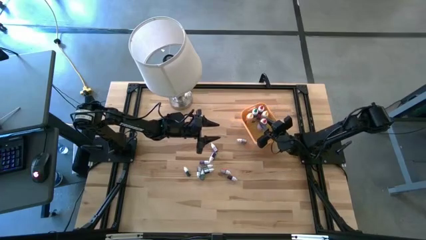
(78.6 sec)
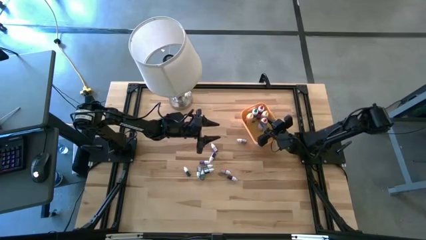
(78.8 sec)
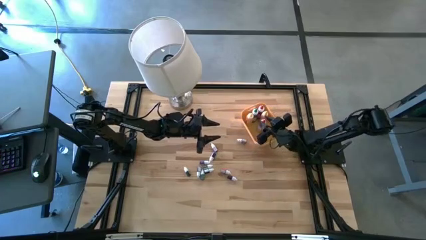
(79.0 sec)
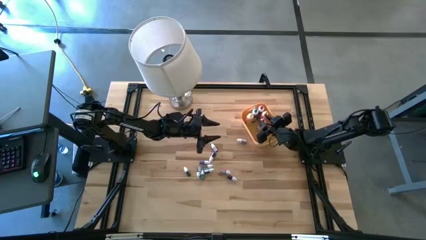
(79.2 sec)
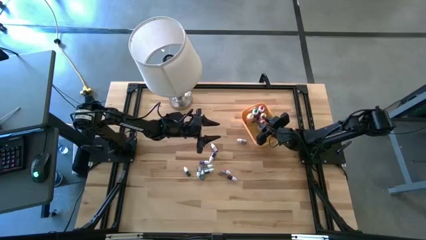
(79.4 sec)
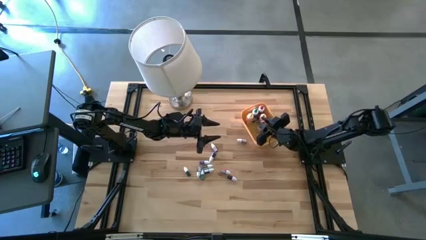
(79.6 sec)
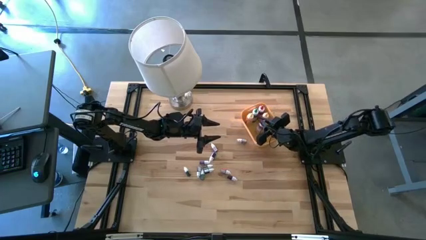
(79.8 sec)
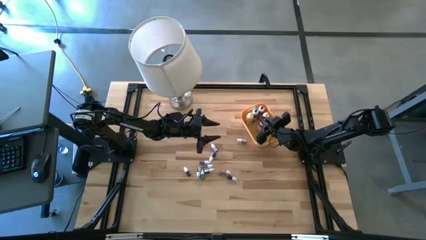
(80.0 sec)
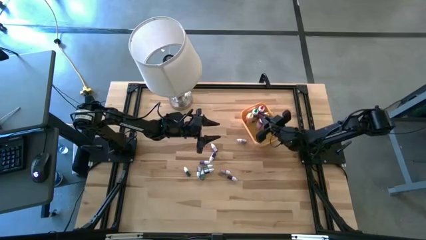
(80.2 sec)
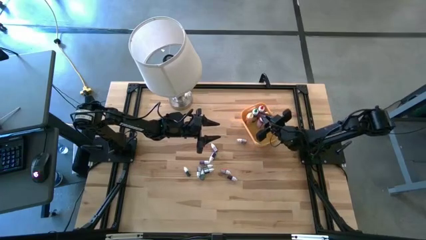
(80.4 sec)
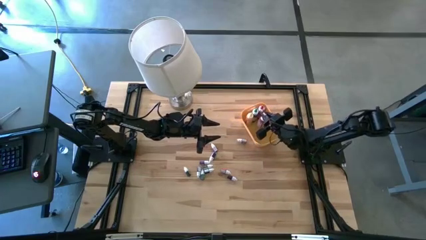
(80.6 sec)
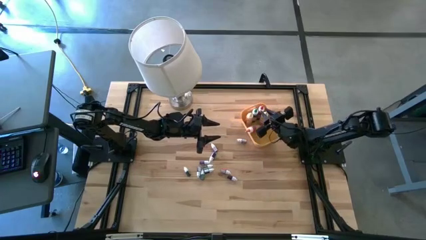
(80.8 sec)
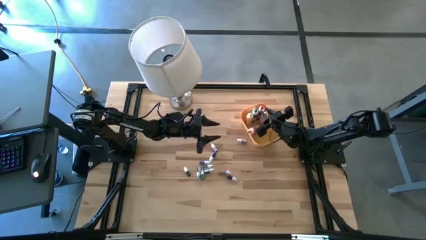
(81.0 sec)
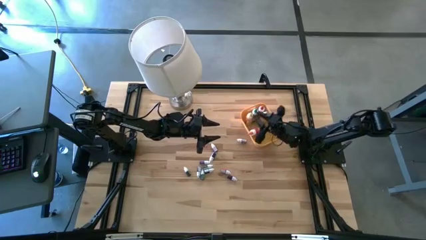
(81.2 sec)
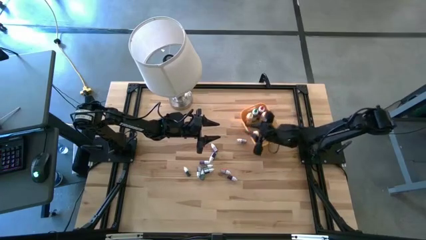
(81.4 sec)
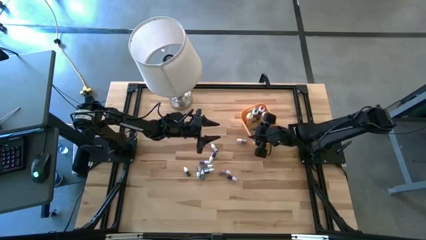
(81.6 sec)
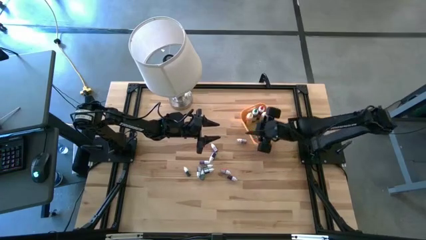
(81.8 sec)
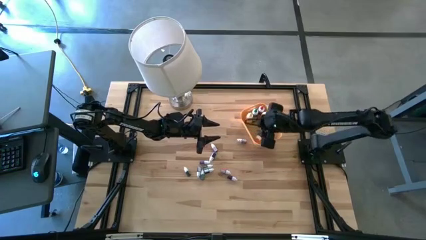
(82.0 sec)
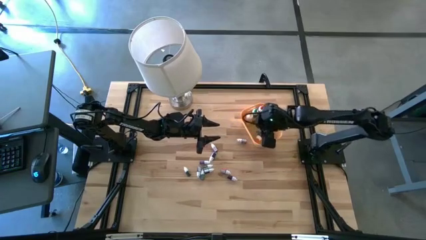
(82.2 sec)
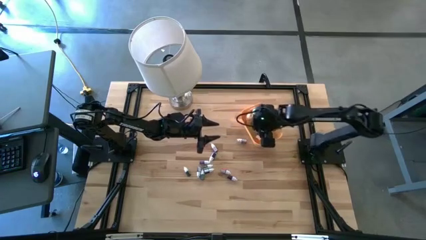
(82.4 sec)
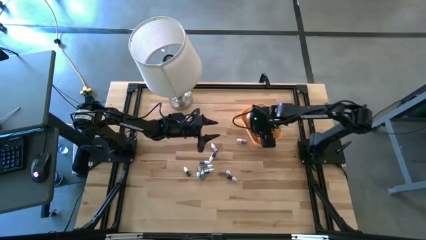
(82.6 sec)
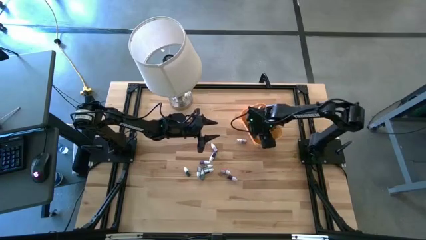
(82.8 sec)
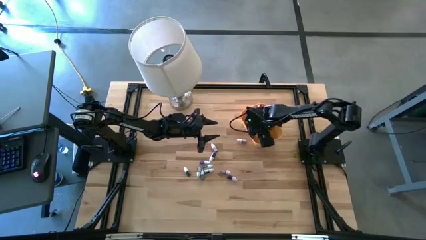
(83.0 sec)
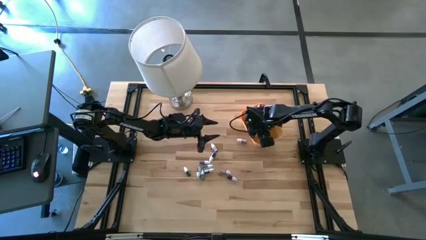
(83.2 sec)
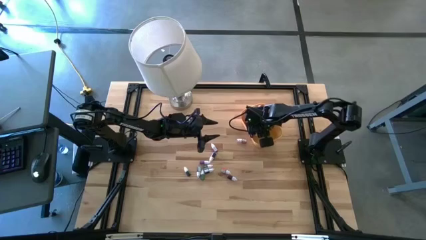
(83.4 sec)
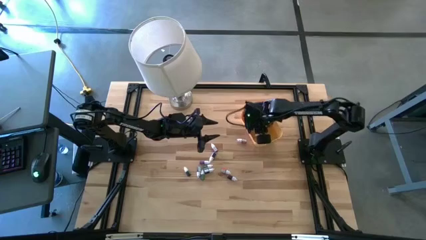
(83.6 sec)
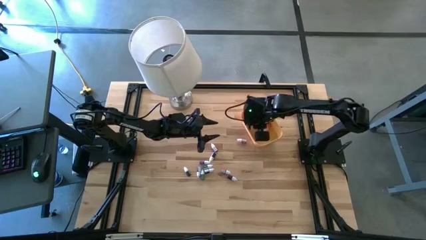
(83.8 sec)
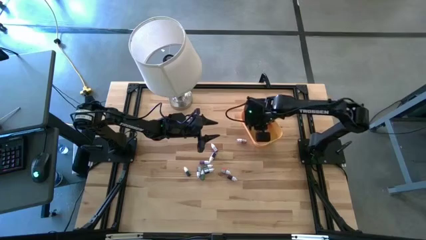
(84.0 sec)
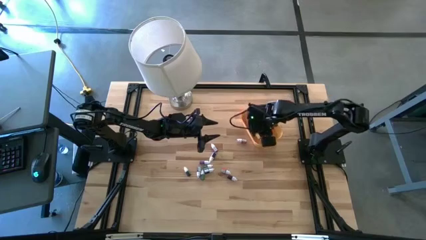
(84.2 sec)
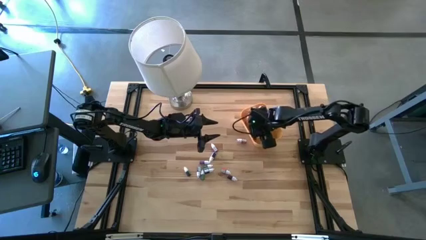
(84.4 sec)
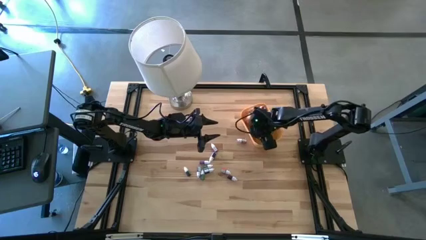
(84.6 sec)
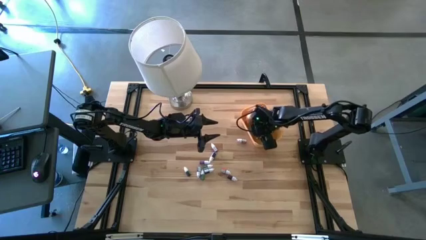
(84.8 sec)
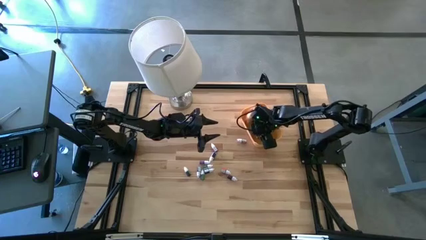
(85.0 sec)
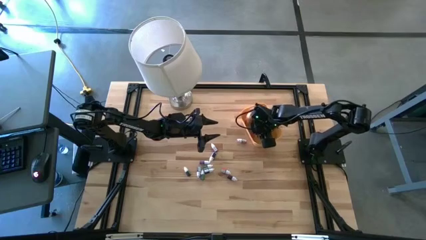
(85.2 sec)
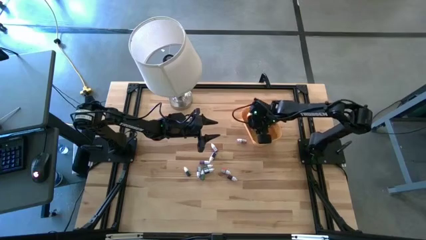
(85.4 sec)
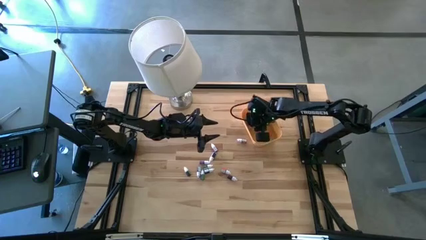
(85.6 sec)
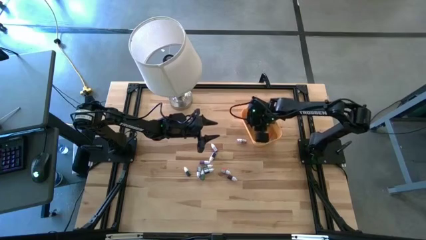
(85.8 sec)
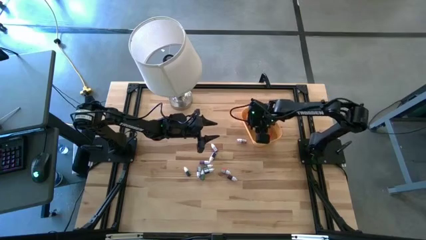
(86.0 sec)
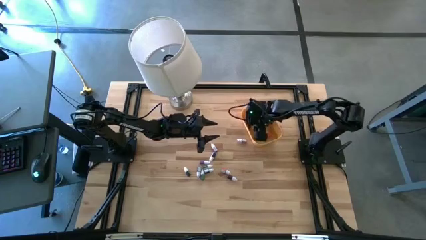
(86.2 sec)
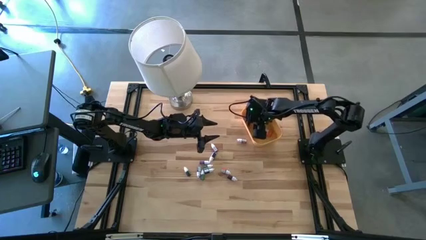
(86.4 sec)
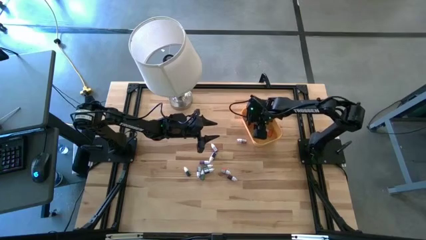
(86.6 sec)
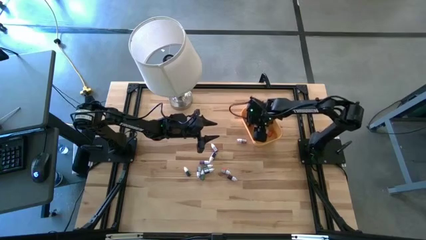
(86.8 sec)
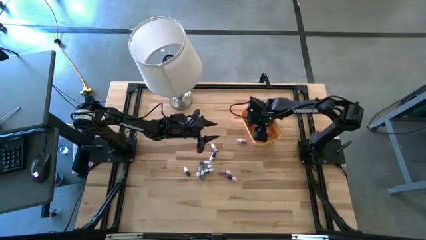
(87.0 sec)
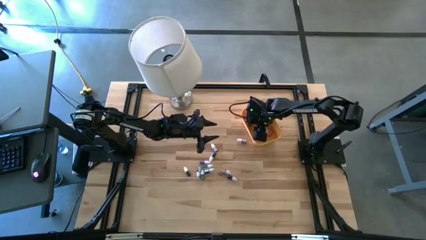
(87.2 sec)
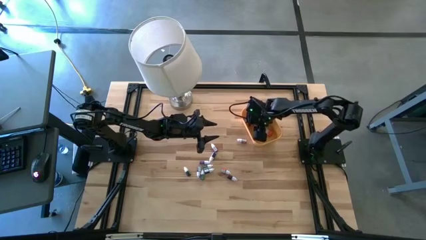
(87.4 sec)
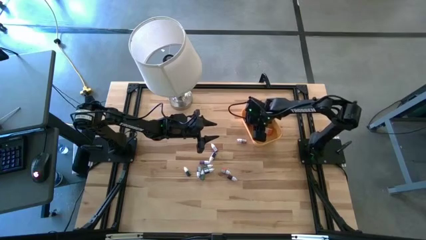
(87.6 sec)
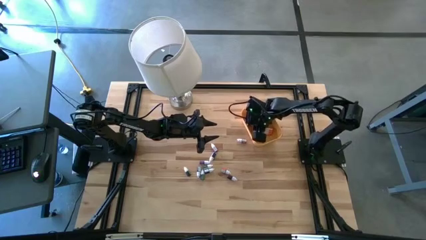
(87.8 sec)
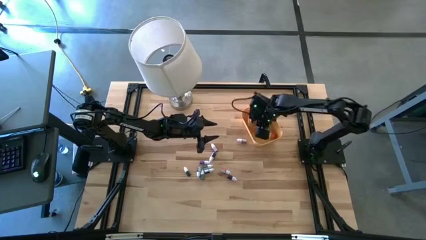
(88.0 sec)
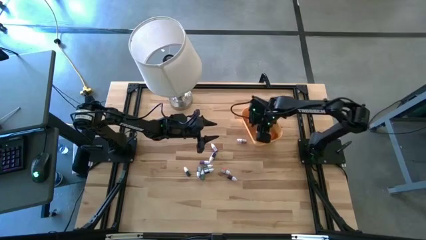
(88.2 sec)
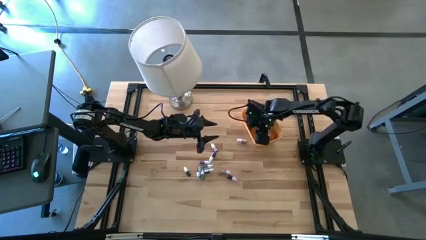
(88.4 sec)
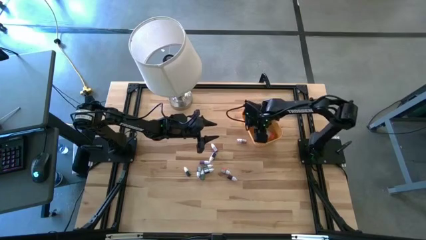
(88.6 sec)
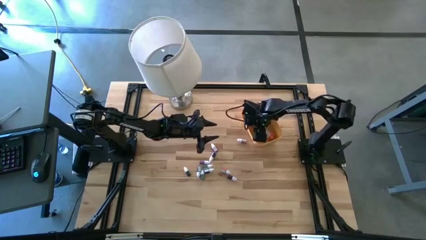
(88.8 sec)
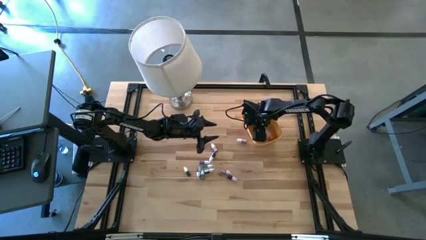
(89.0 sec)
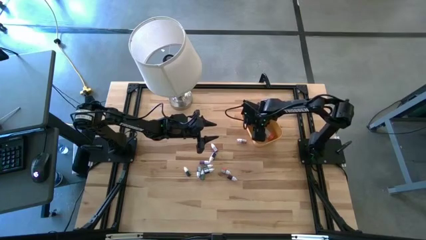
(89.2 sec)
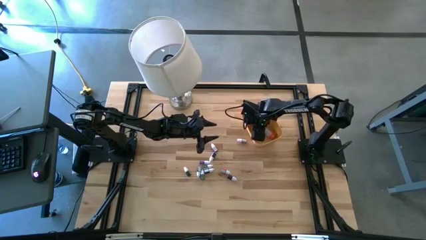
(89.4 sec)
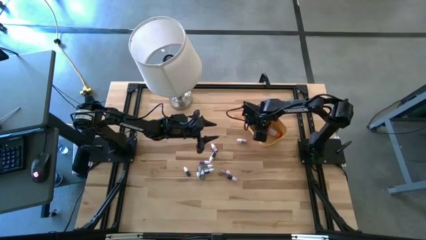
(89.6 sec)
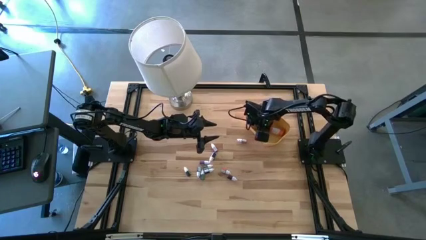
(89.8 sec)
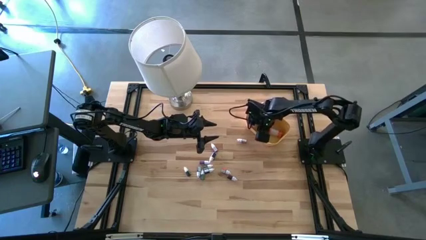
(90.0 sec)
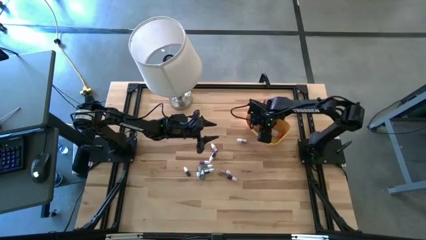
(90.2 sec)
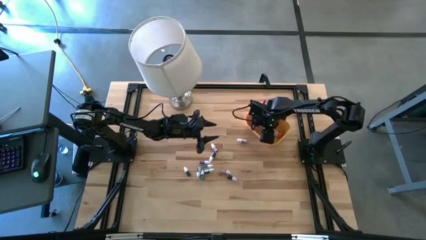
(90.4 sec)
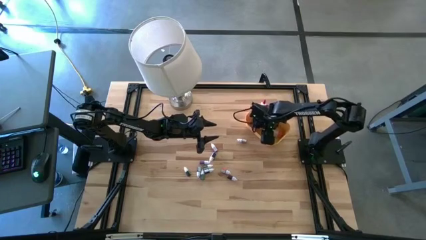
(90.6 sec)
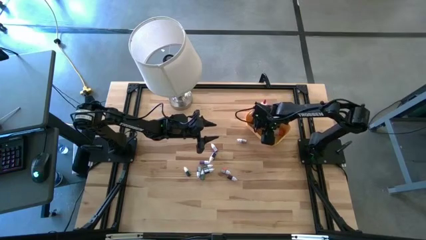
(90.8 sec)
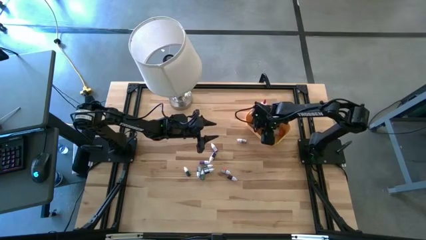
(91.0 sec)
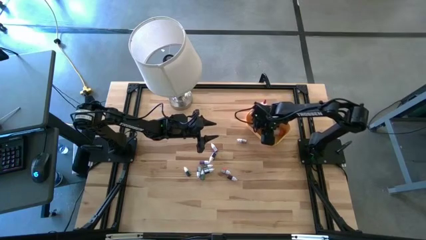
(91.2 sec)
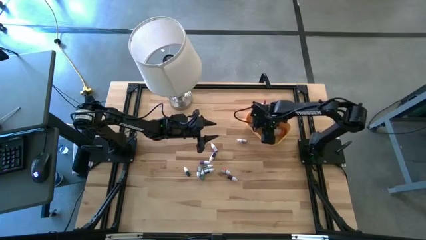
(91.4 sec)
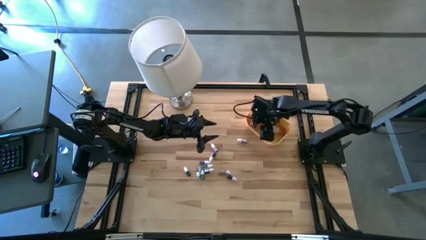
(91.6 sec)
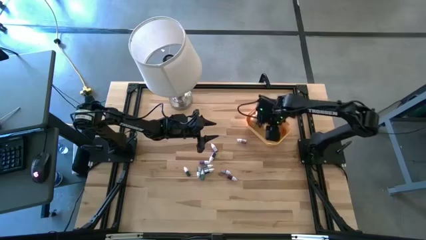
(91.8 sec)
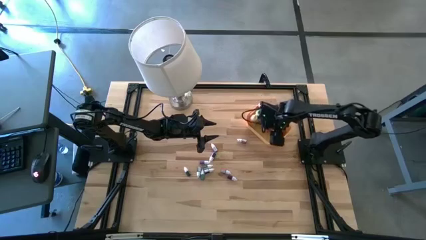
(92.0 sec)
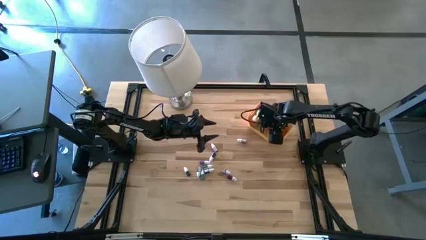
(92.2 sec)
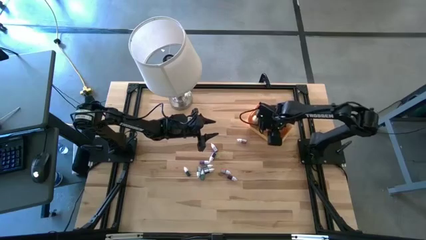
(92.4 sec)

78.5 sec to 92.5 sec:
Task: Pick & Place food coloring
Put the large orange food coloring bottle into the yellow bin

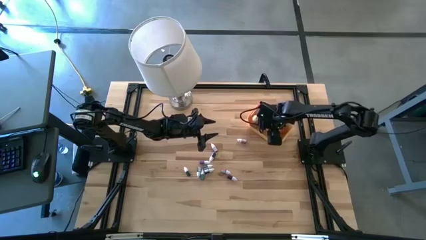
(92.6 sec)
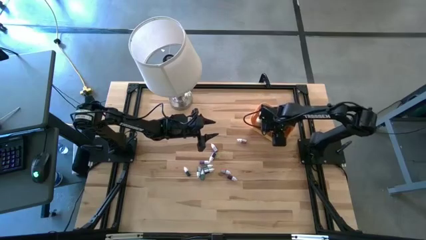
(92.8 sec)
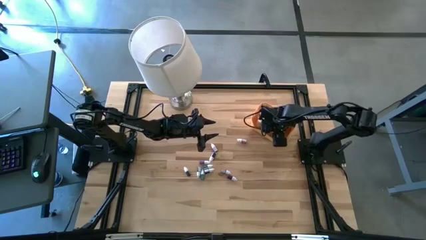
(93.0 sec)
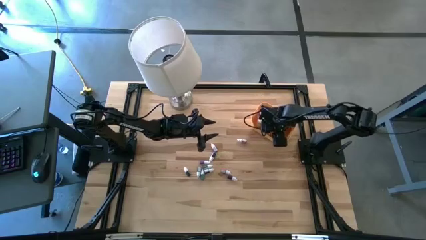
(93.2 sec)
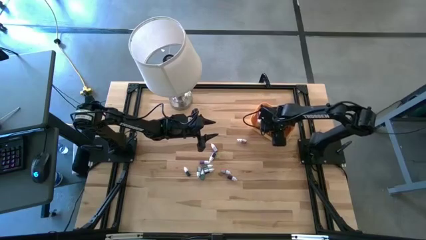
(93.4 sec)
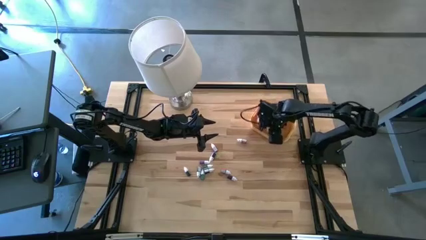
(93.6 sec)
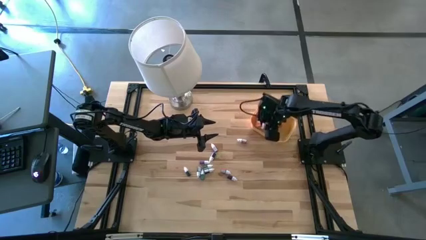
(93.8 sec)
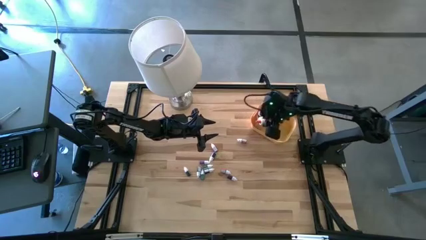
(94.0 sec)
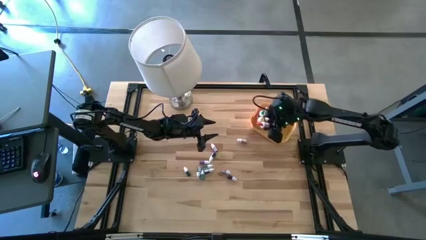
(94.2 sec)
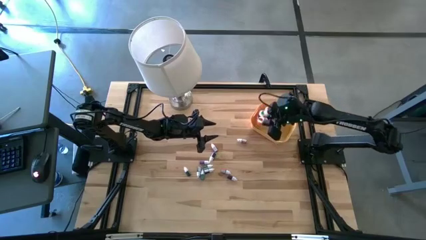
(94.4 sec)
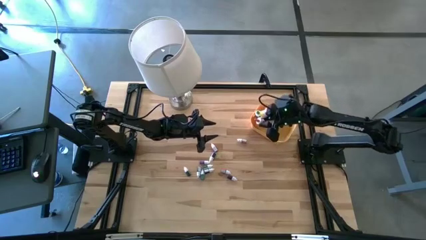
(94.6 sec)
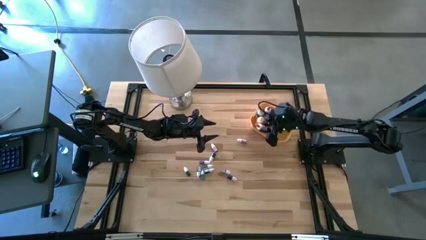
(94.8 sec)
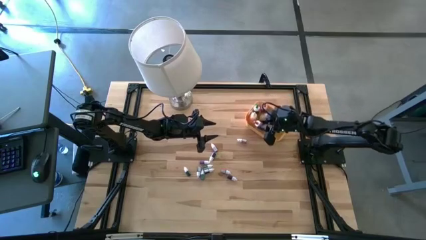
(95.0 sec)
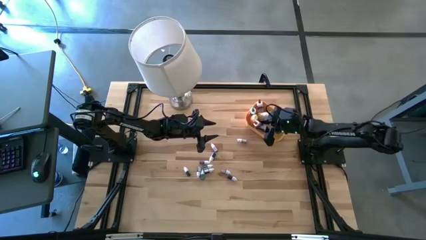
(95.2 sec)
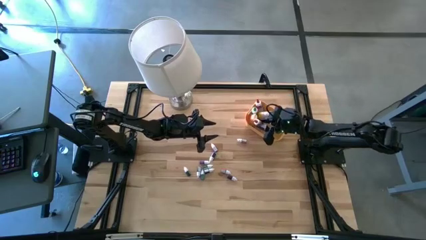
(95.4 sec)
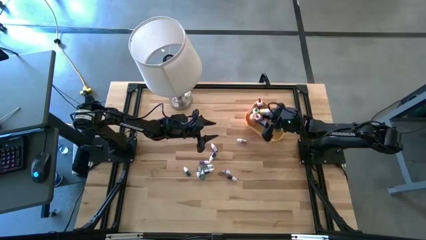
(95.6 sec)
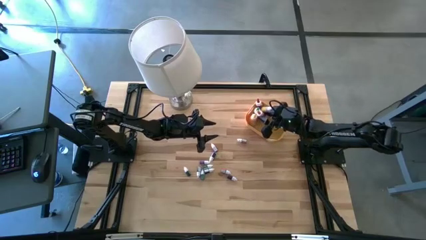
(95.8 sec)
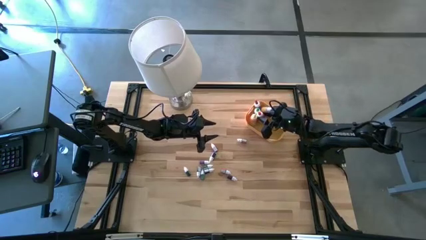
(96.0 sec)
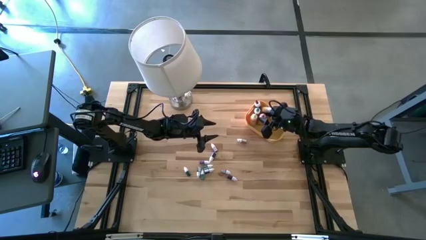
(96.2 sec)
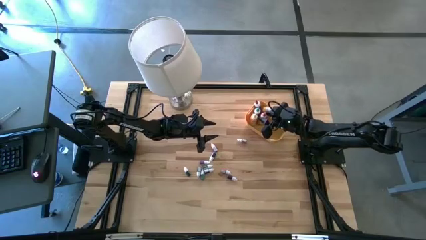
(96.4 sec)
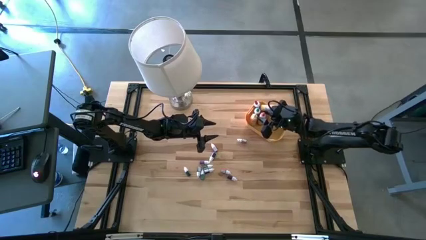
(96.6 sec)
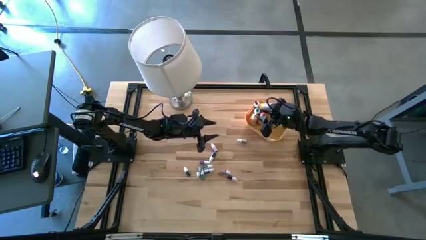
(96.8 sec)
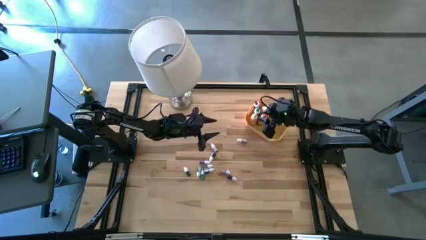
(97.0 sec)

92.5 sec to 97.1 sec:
Put the large orange food coloring bottle into the yellow bin
